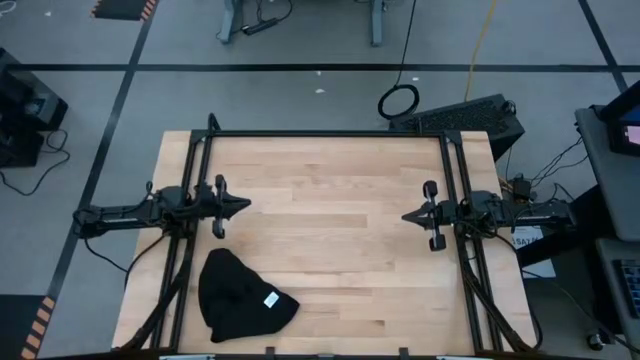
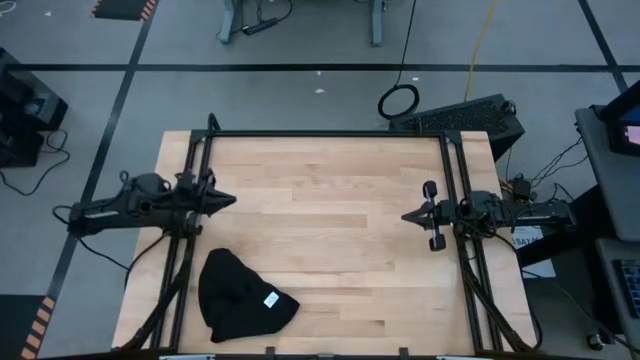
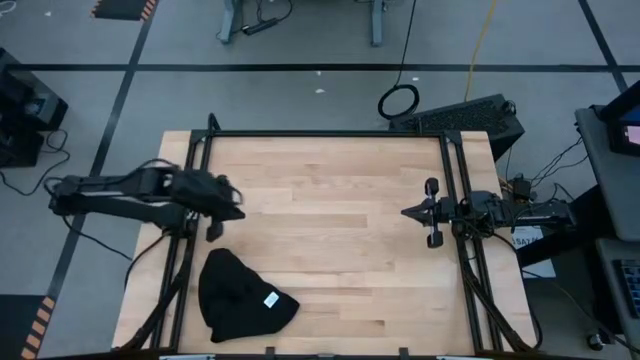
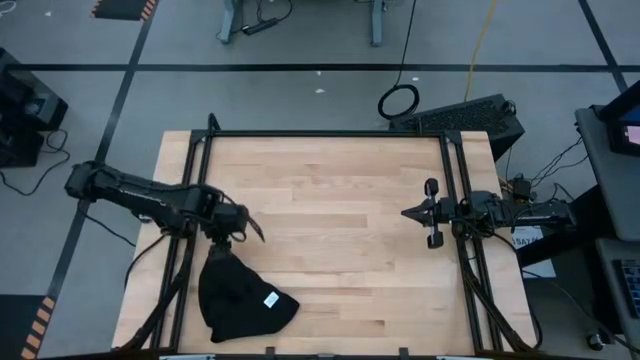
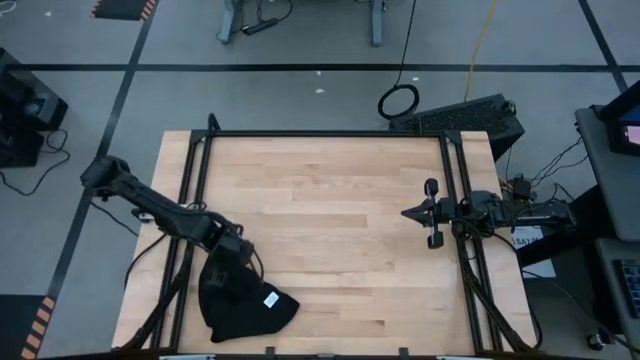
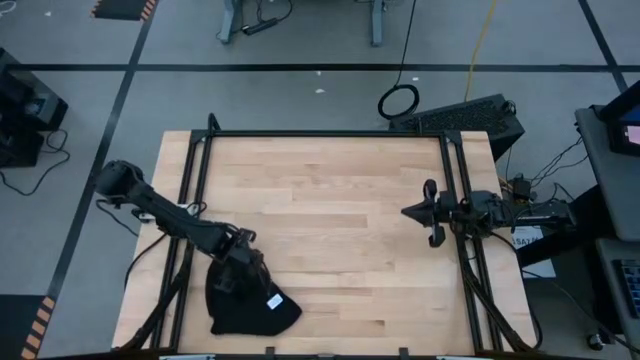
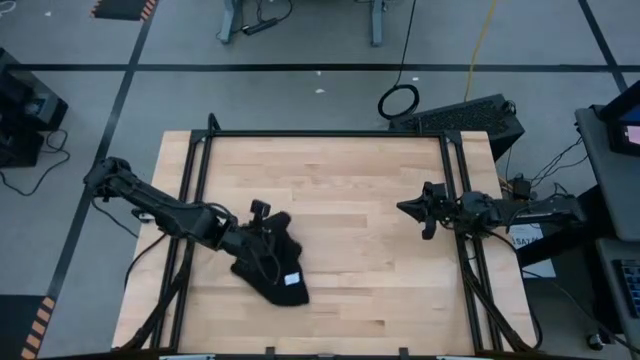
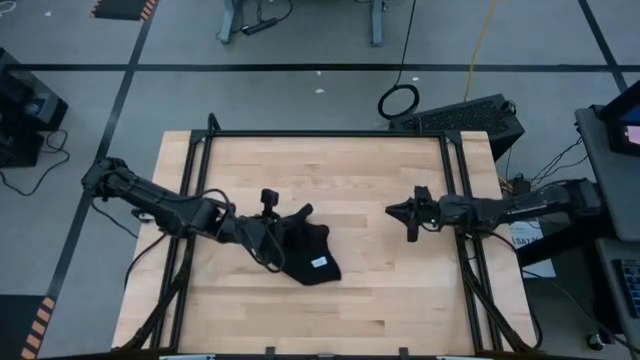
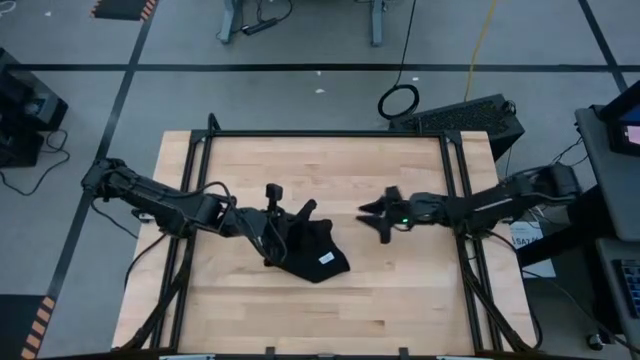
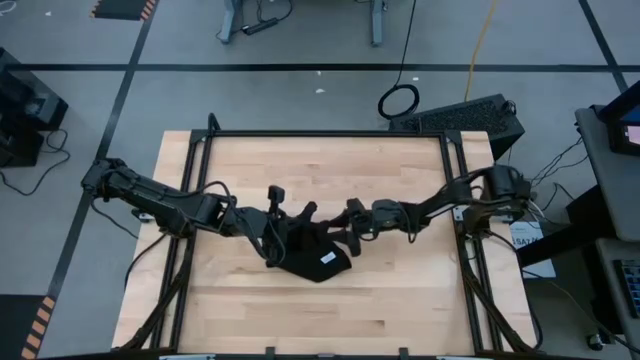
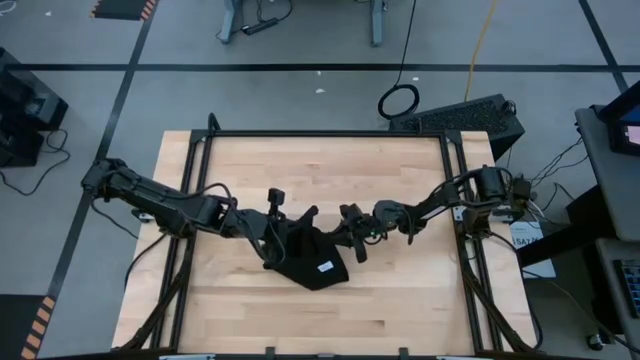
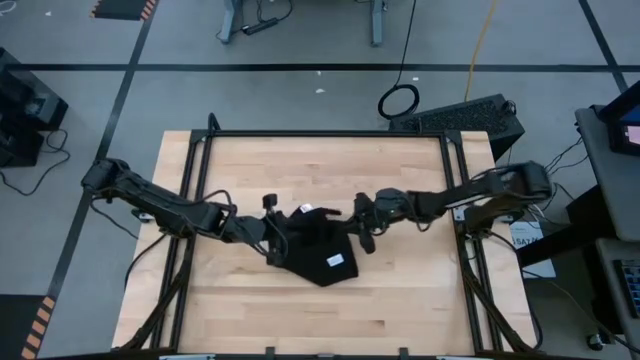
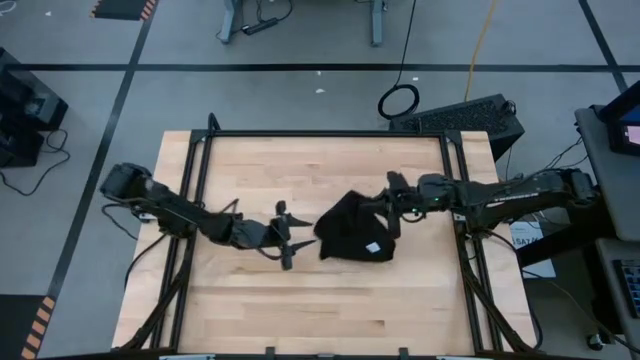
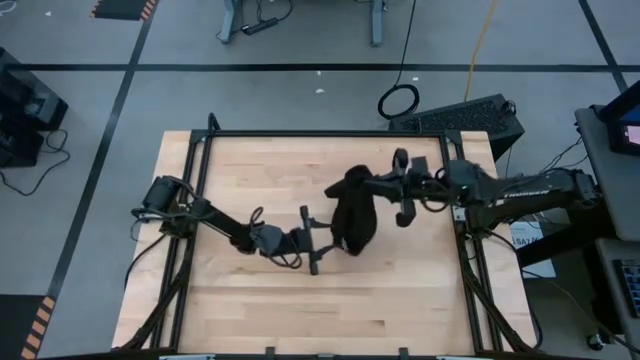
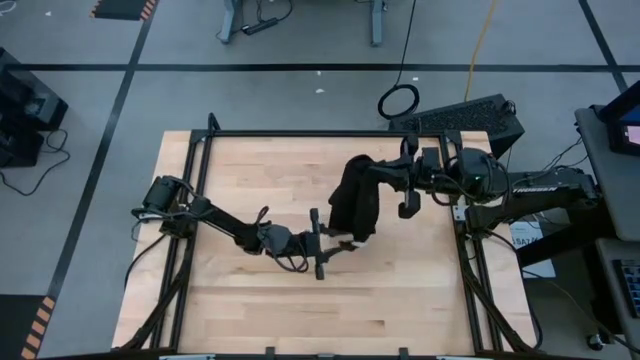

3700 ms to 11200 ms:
Task: Roll towel
Roll the black microfiber towel
